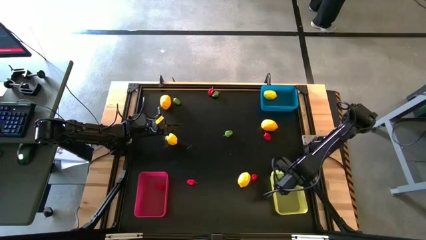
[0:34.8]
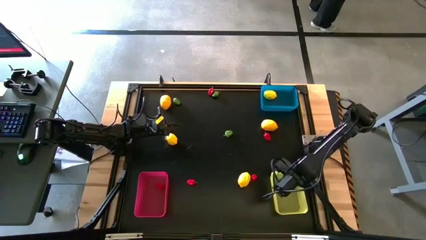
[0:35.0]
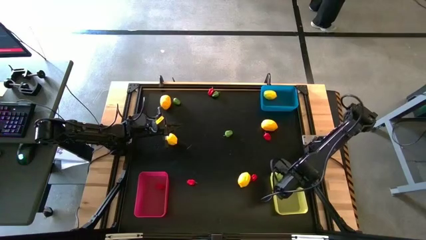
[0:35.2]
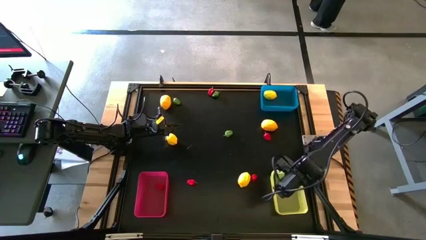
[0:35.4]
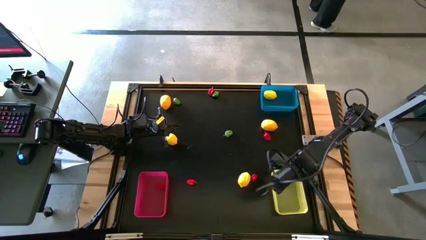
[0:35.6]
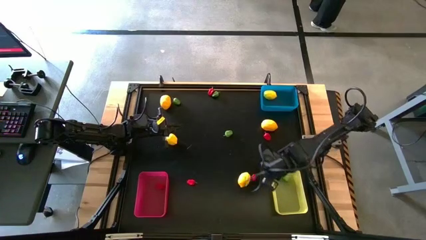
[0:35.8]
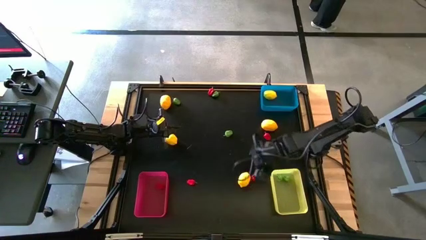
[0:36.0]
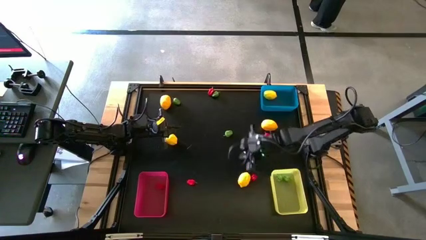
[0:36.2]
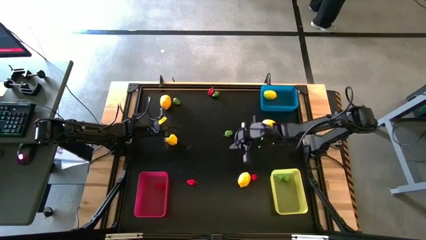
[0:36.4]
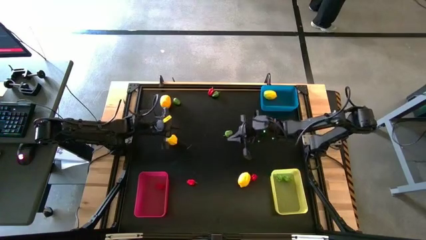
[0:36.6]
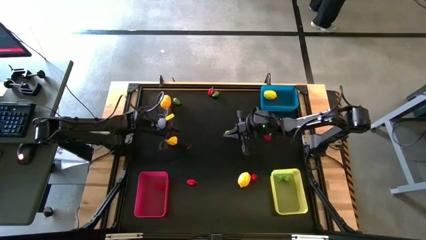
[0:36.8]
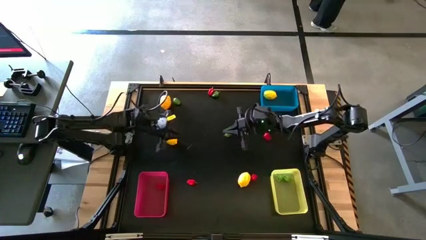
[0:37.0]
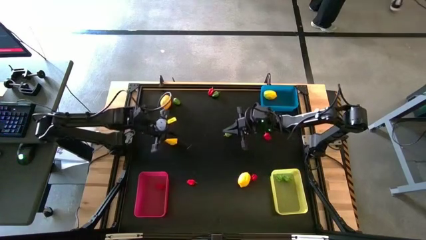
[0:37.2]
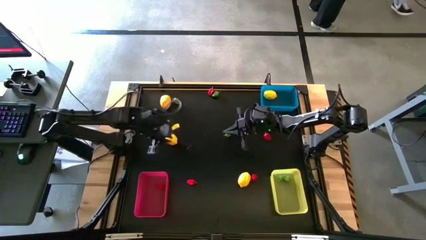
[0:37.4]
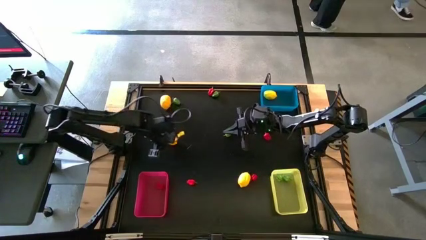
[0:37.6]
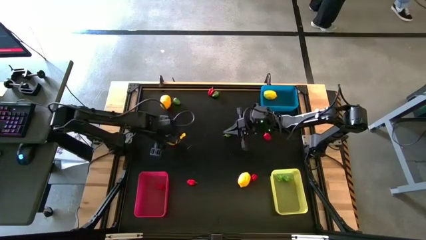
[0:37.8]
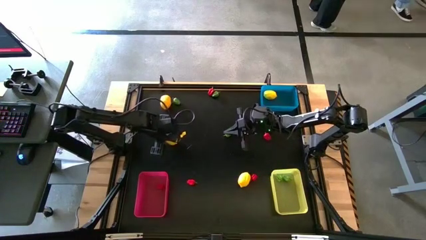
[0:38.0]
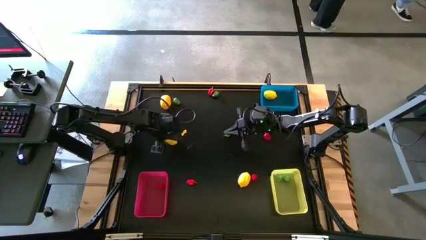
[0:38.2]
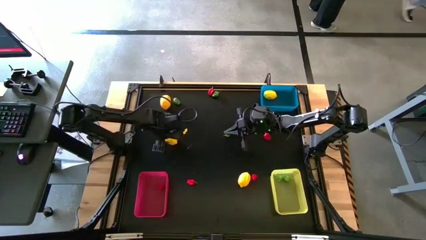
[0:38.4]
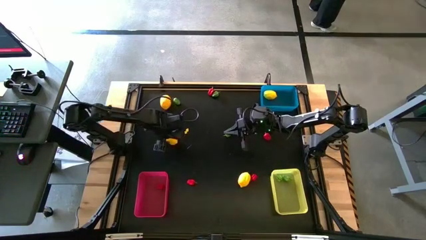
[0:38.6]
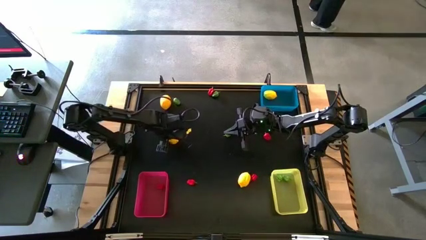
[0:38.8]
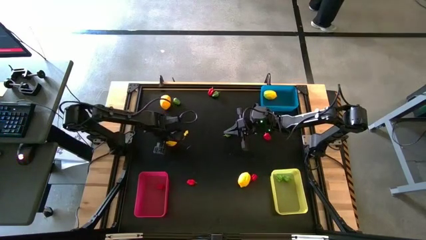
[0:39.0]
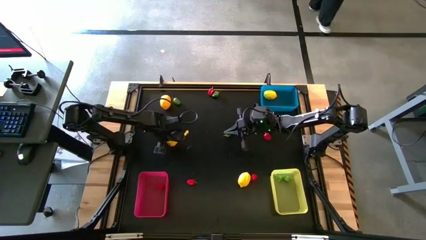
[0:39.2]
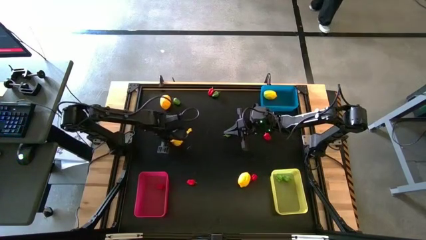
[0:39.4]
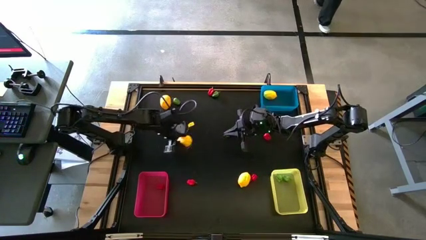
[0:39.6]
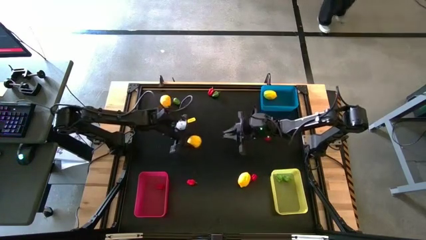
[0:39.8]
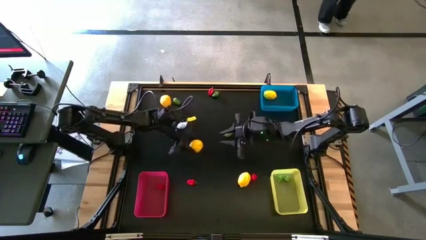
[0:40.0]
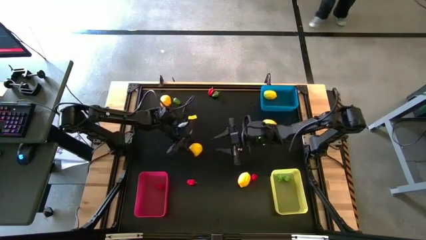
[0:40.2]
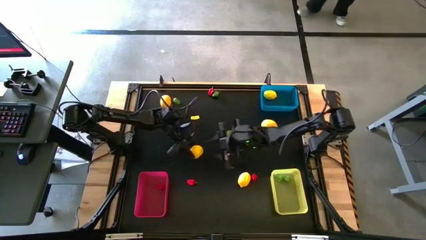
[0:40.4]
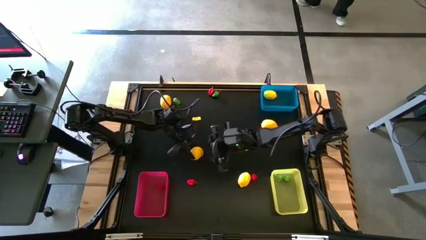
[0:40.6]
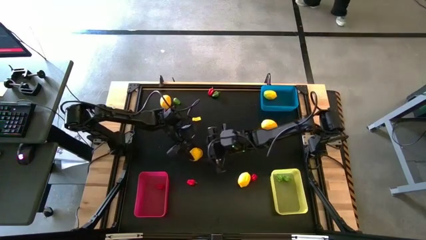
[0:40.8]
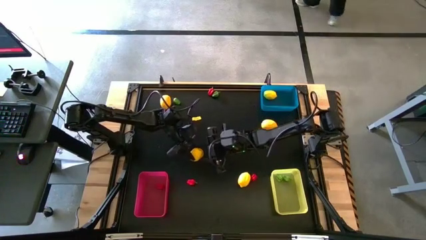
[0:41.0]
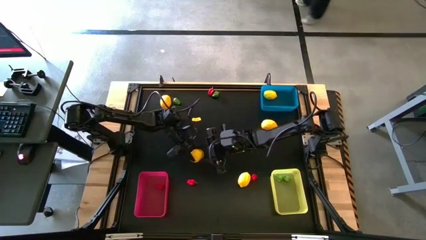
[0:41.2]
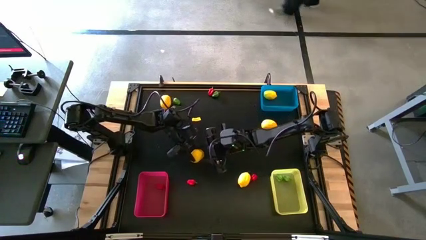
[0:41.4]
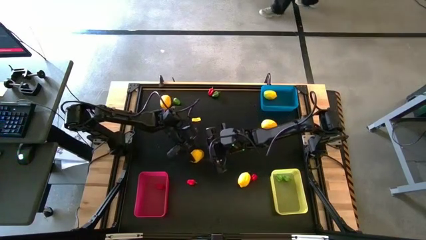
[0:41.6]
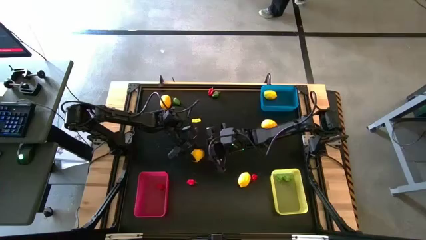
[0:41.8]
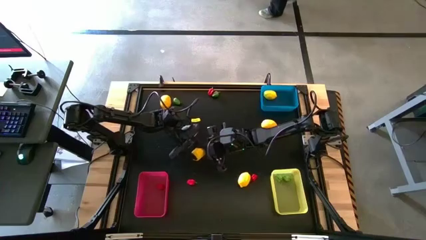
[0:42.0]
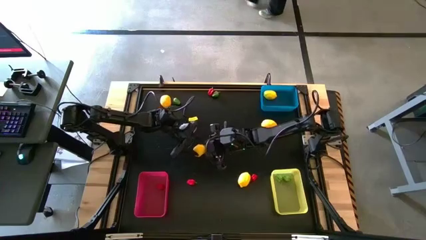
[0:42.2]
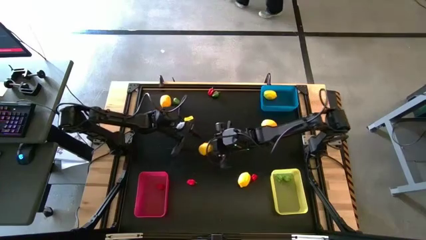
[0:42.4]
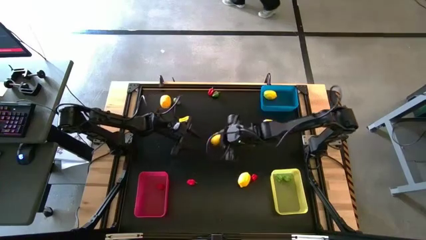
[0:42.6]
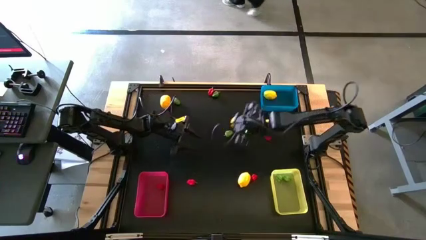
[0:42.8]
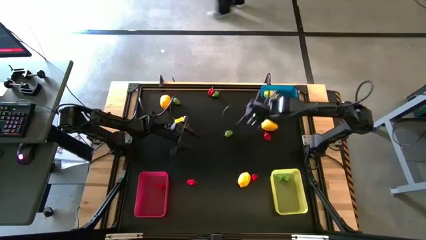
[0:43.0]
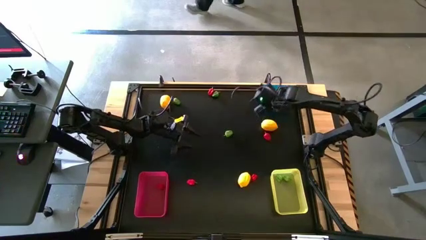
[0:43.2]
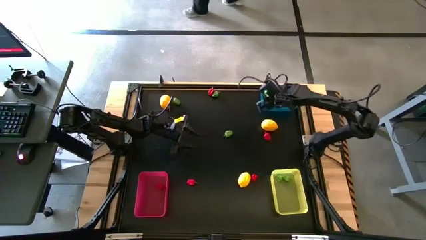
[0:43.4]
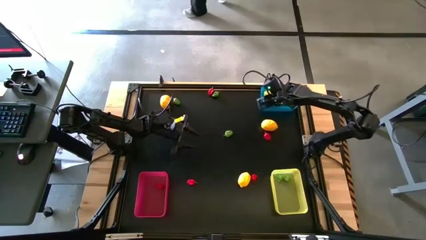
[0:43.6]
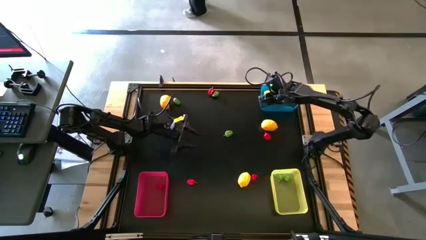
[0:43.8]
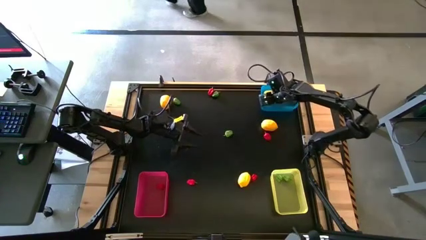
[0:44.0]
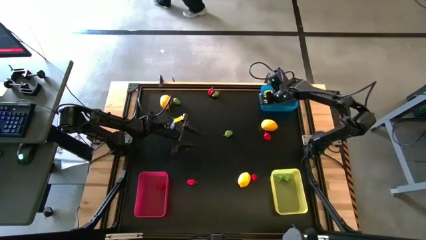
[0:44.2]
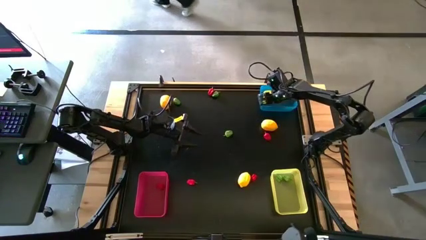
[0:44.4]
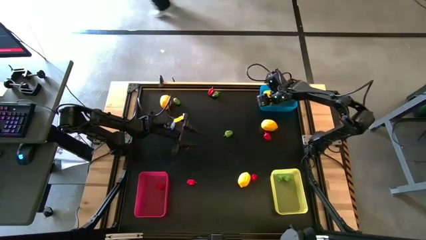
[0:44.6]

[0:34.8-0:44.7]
Task: Sort produce into baskets
Put the yellow lemon into the blue bin

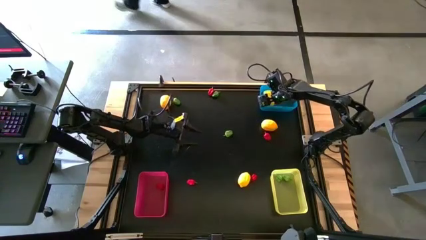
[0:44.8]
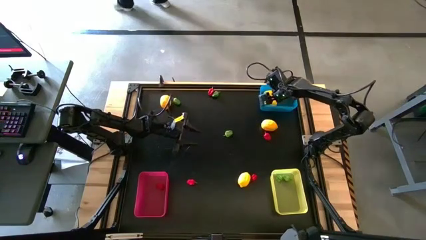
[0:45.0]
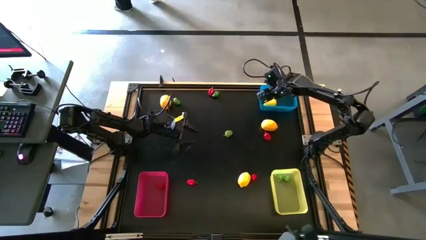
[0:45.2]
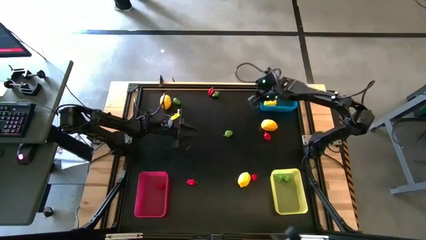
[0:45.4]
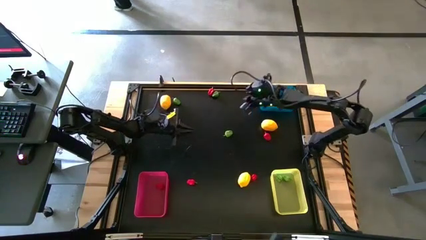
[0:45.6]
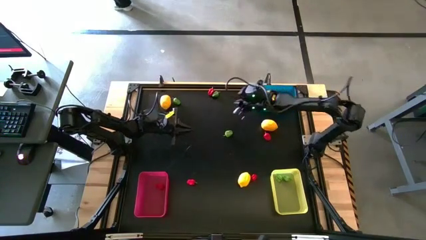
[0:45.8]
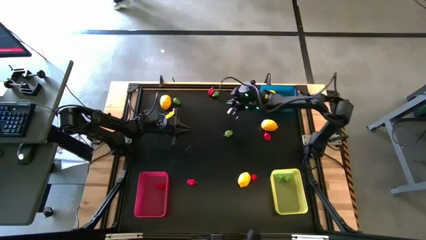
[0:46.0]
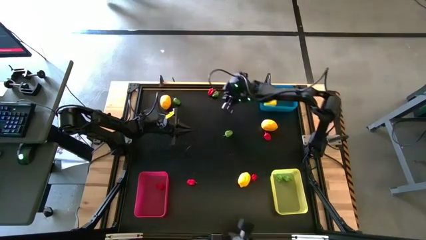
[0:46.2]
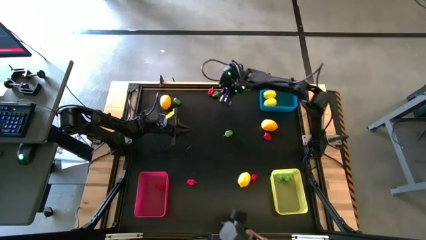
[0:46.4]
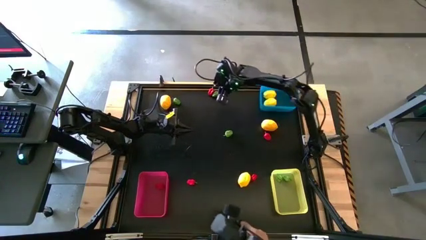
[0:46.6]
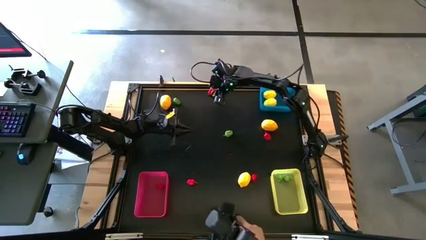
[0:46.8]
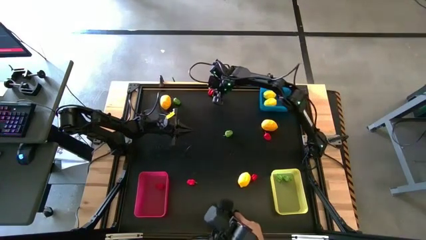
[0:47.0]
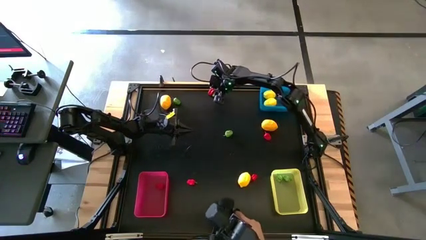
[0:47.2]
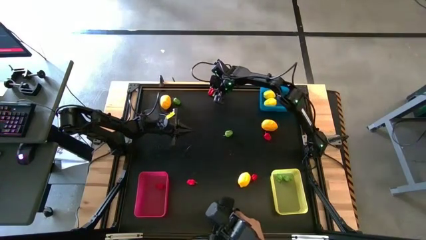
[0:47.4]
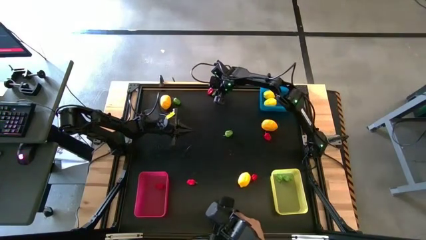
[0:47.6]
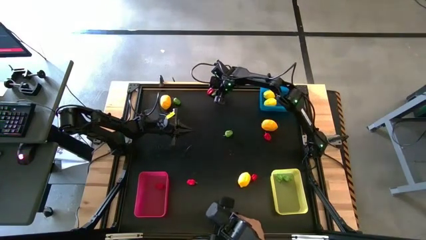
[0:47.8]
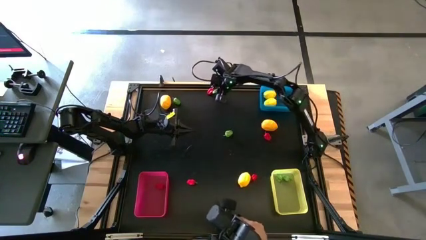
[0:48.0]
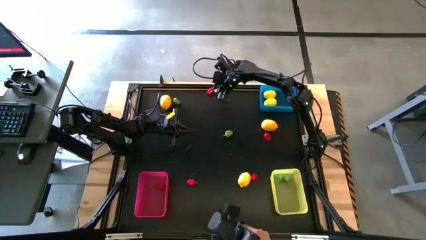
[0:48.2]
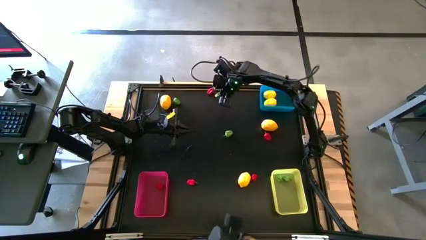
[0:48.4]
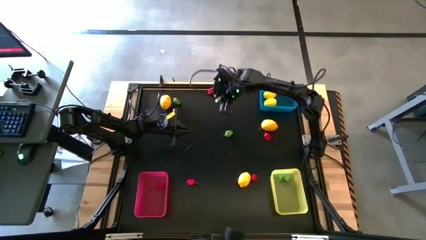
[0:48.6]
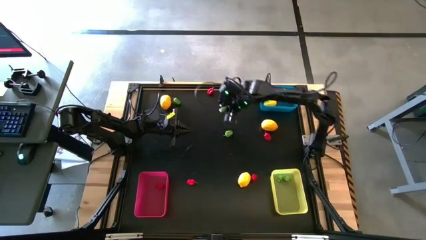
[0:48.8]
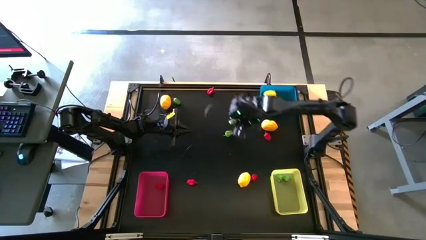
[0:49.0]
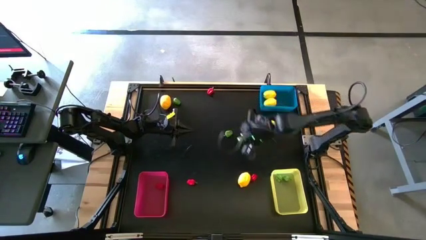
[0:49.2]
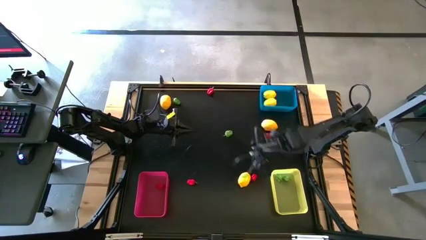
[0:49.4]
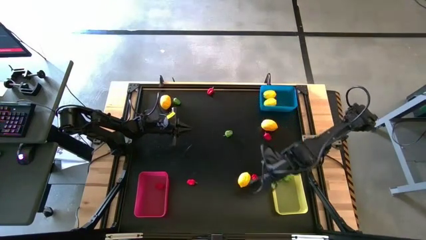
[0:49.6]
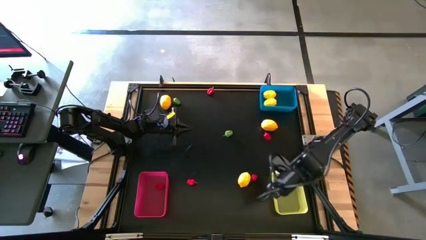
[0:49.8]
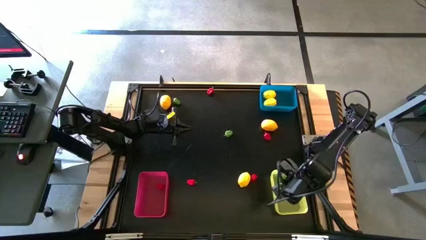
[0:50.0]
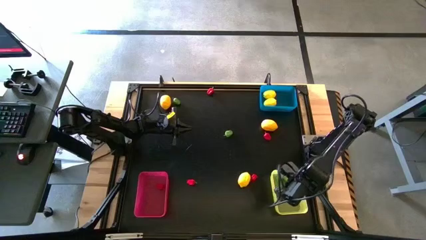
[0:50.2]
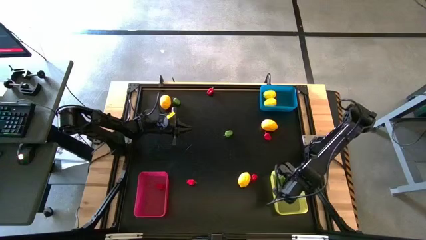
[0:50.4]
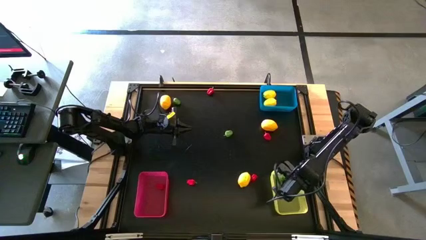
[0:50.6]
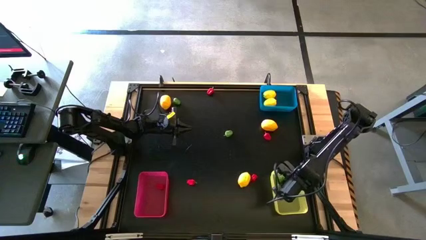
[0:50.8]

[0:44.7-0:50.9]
Put the green chili pepper into the yellow bin
